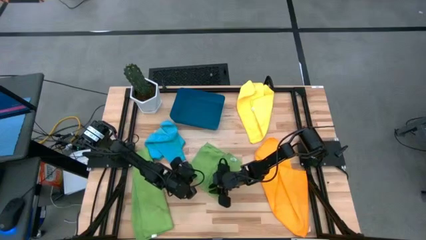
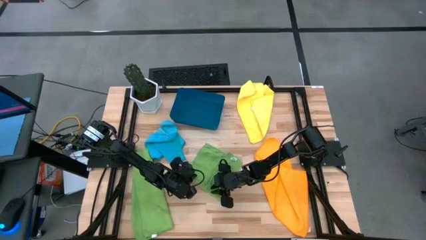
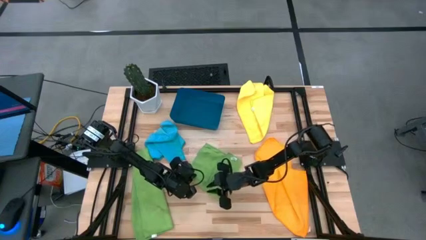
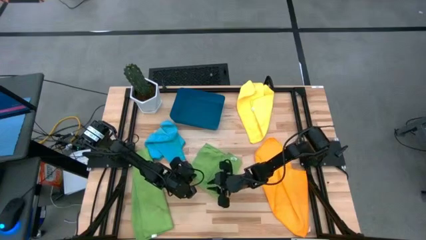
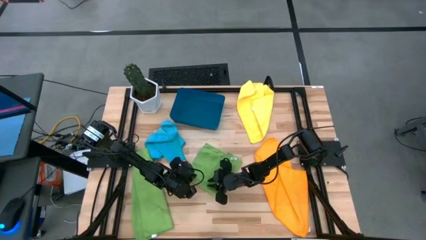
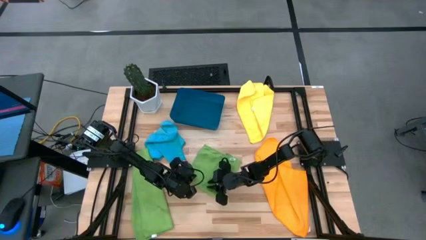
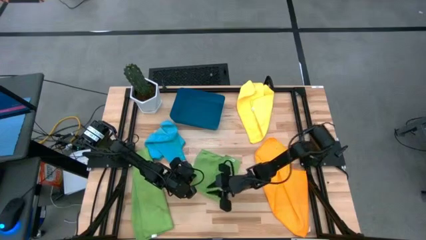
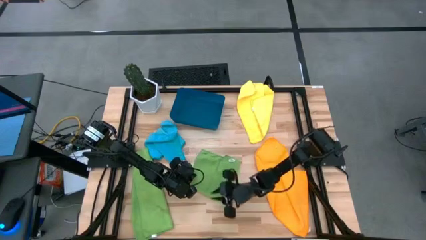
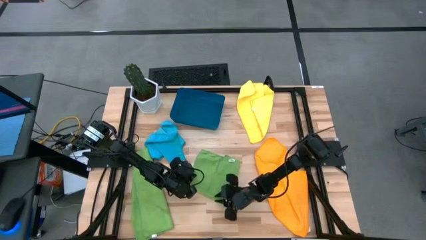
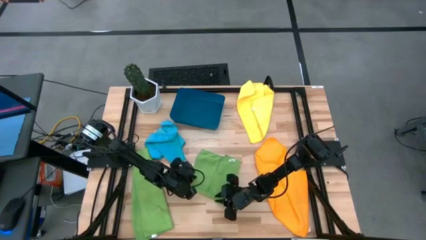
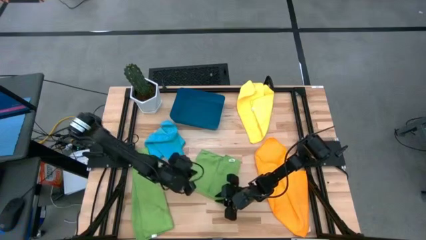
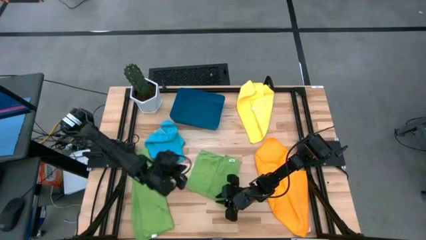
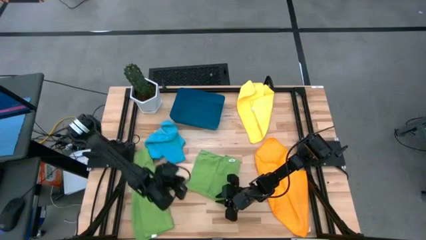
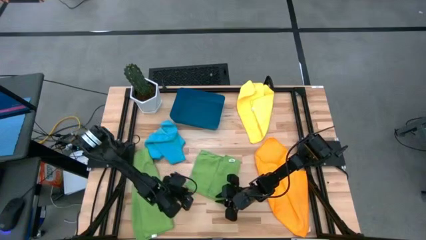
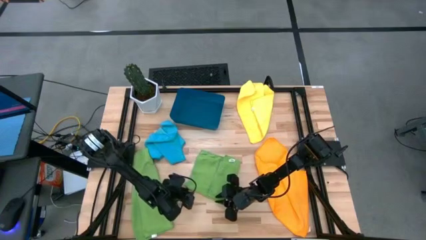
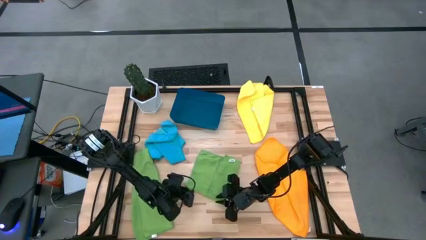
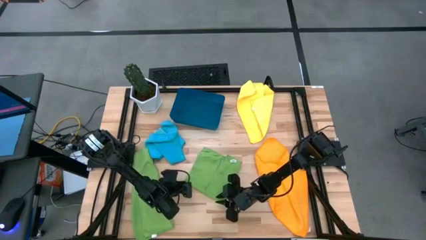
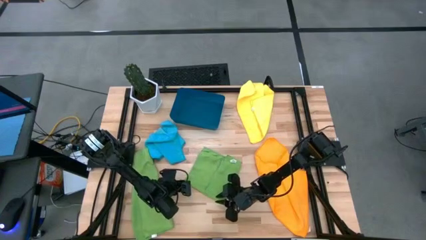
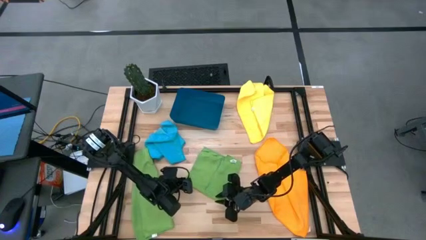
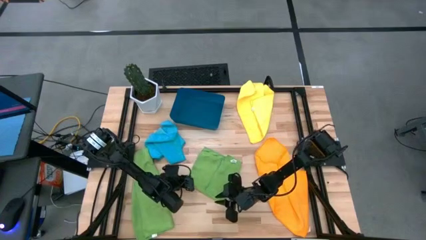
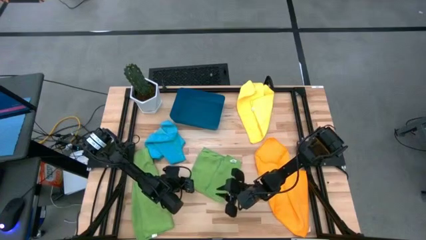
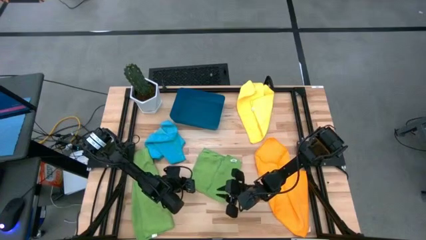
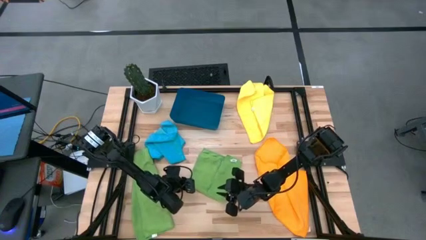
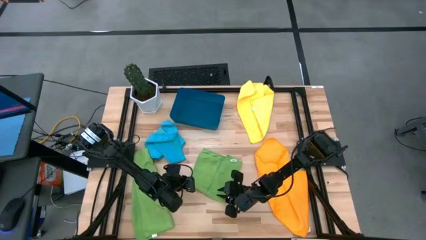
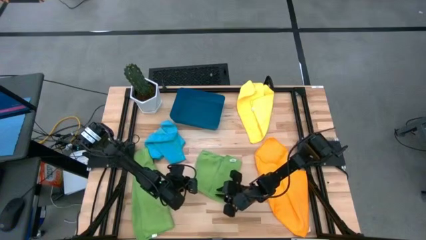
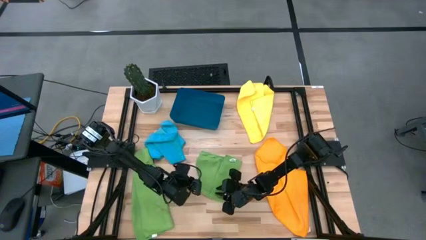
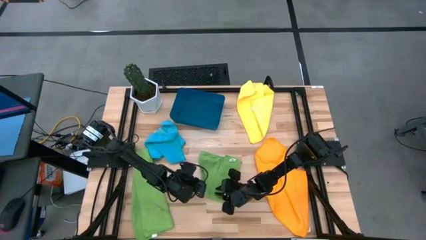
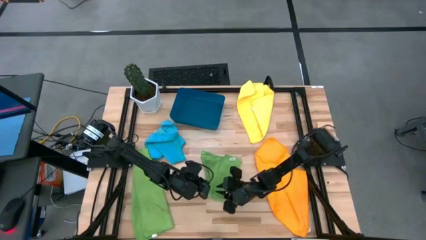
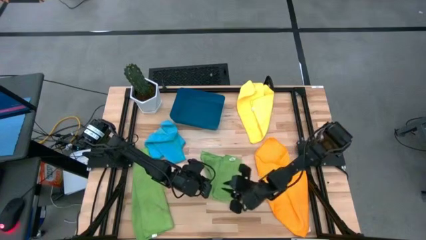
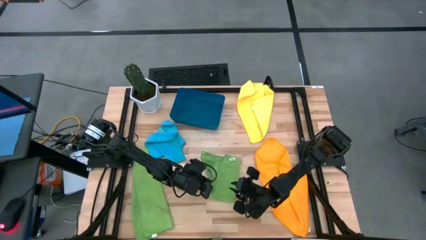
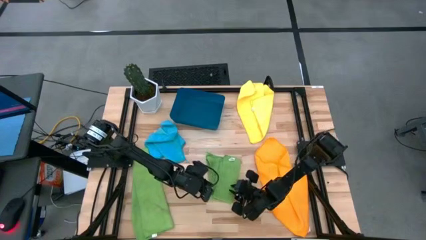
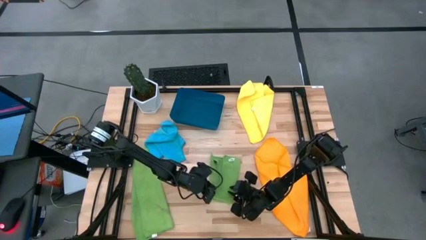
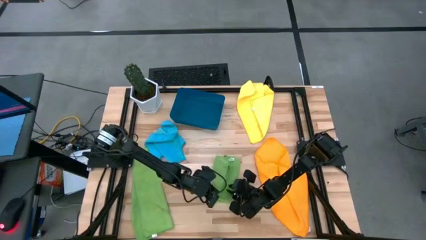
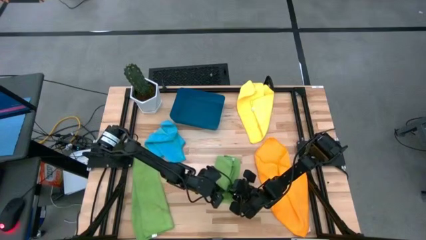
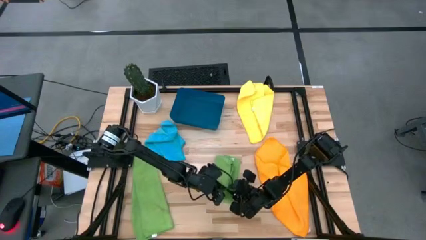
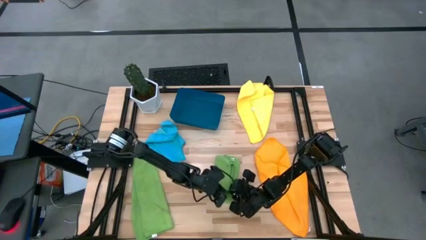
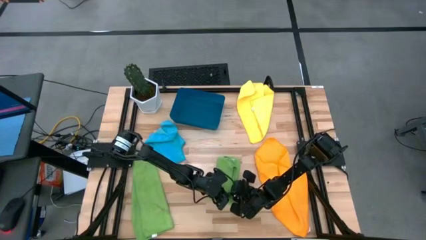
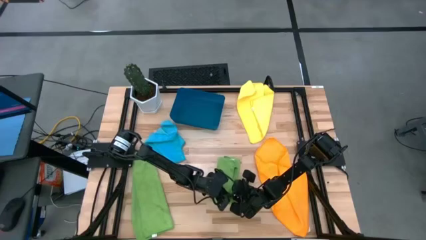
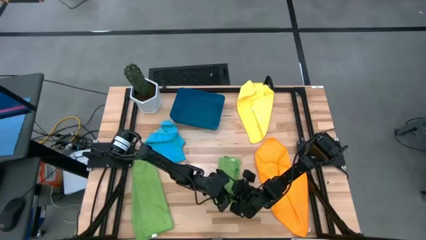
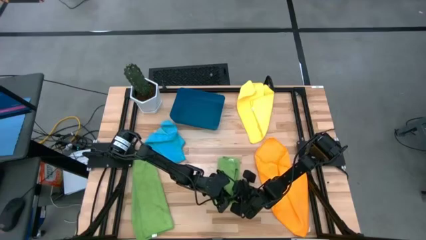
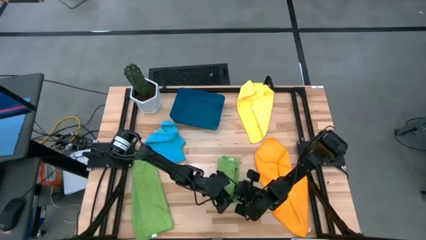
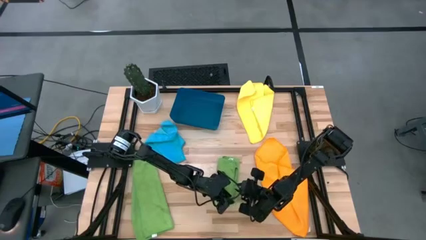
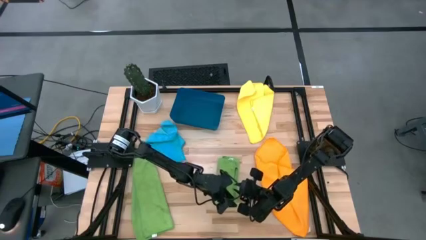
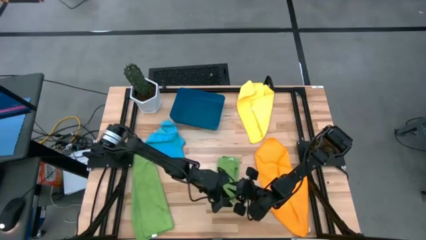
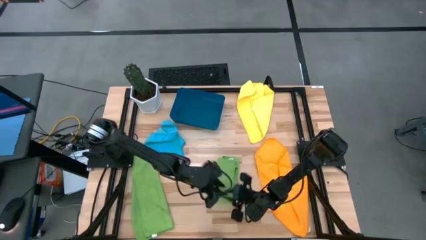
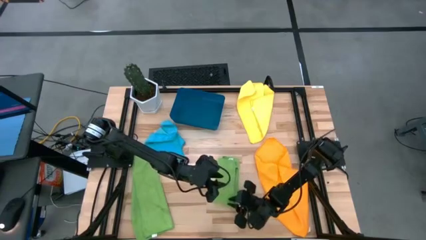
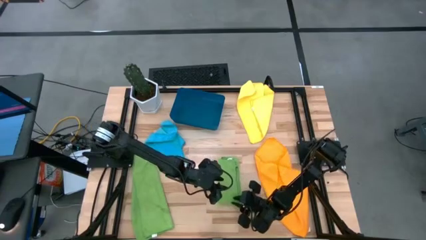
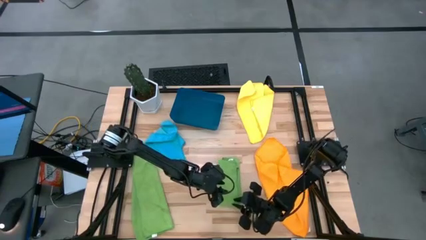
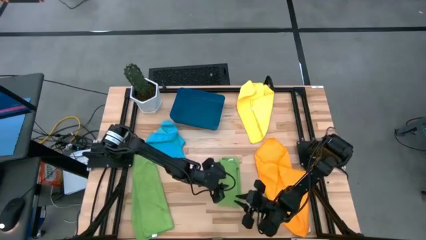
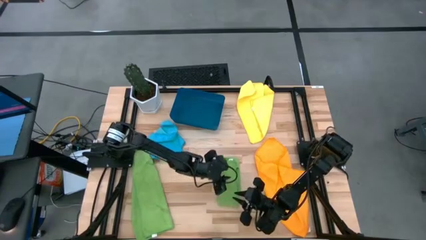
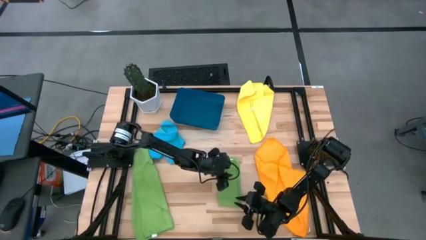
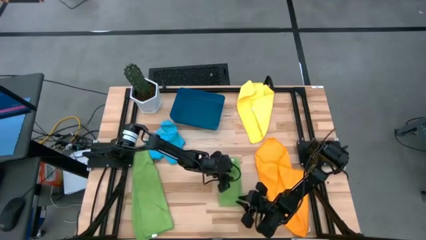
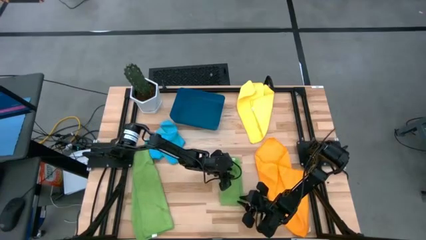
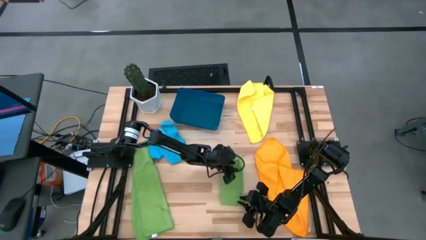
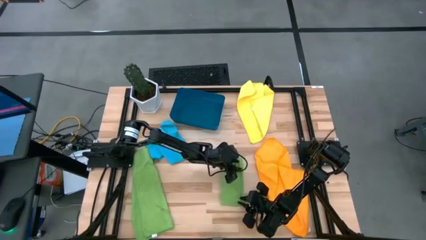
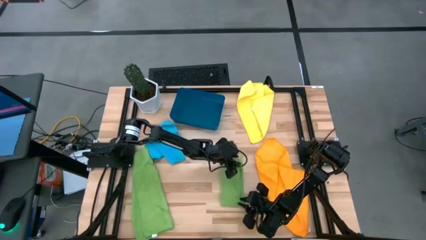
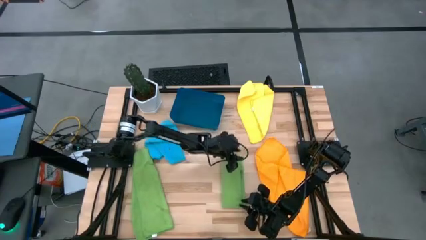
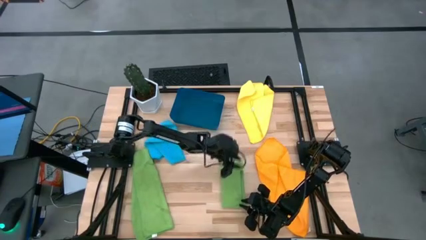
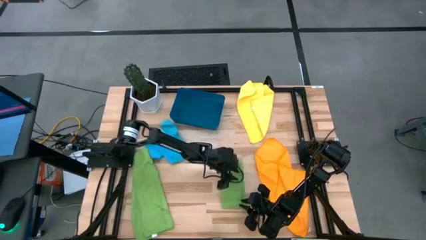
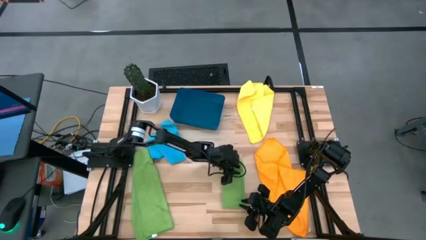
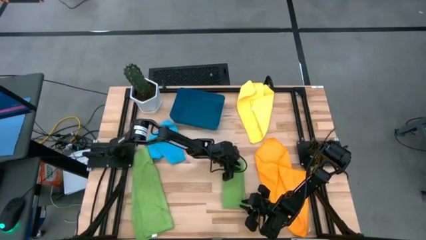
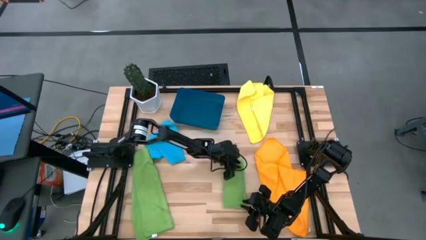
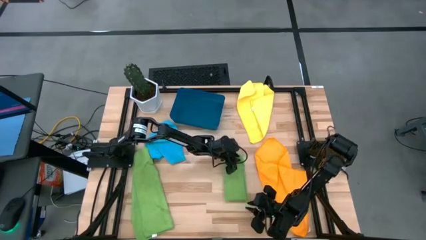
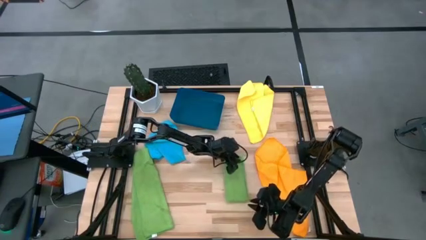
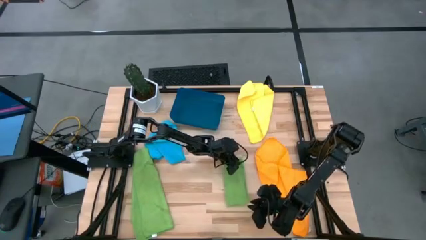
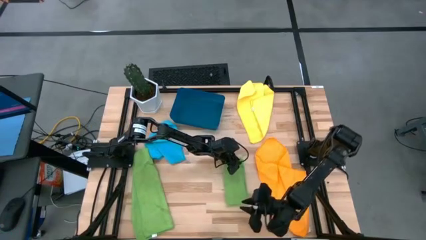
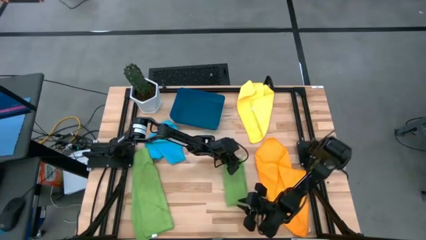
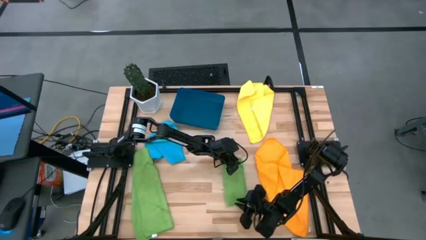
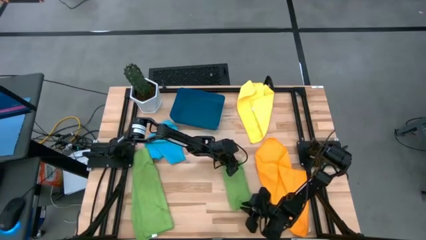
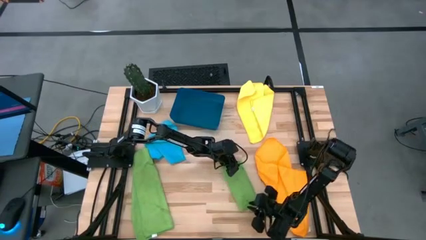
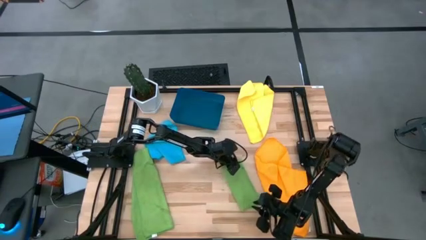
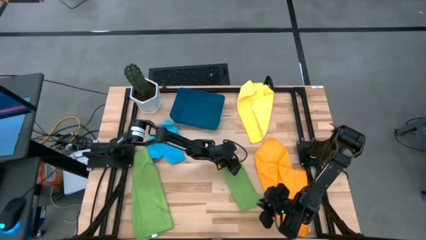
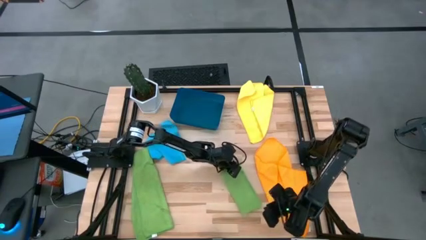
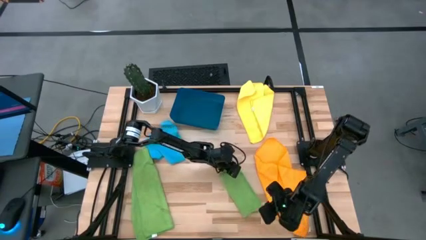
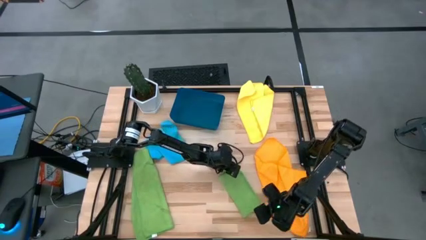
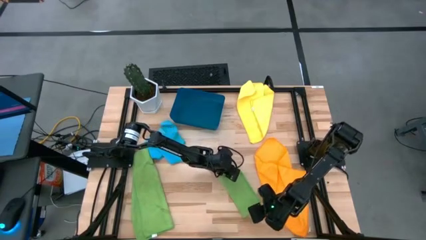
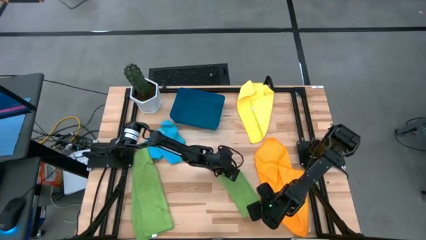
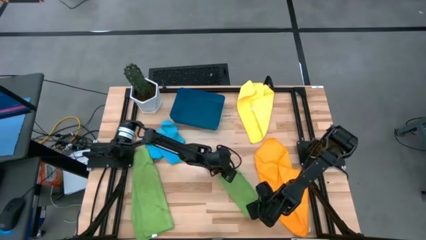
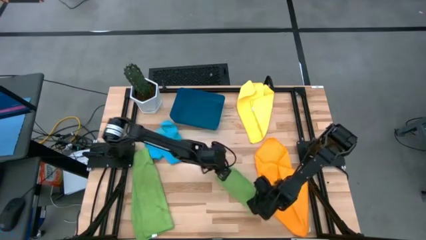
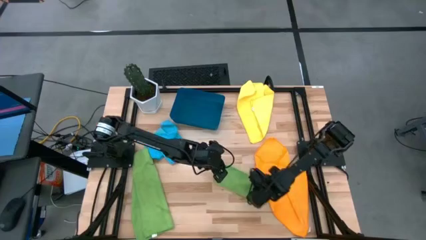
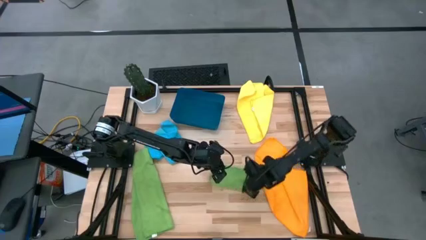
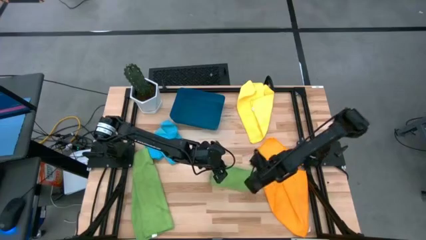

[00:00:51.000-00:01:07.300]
Task: Fold microfiber towels
Fold the right green towel
